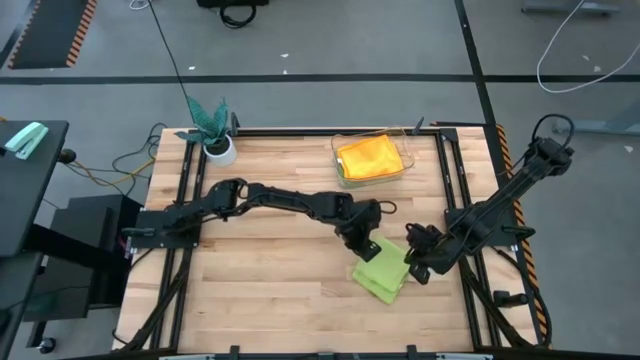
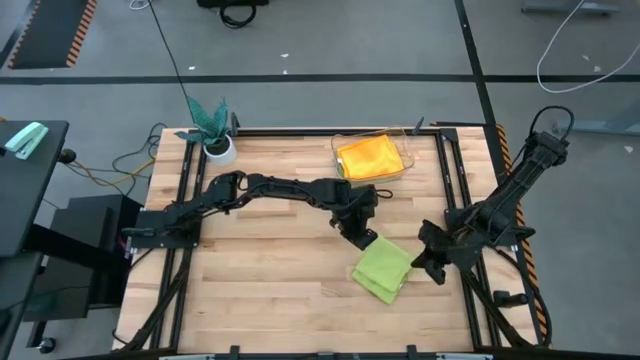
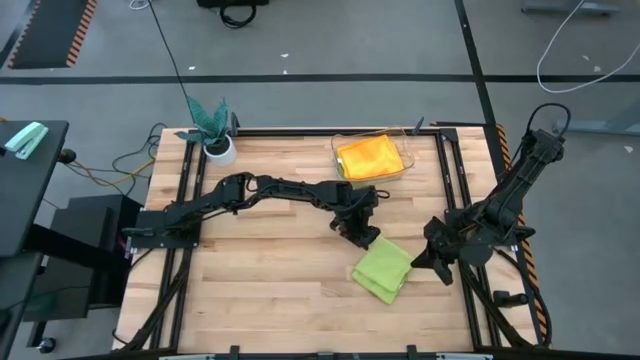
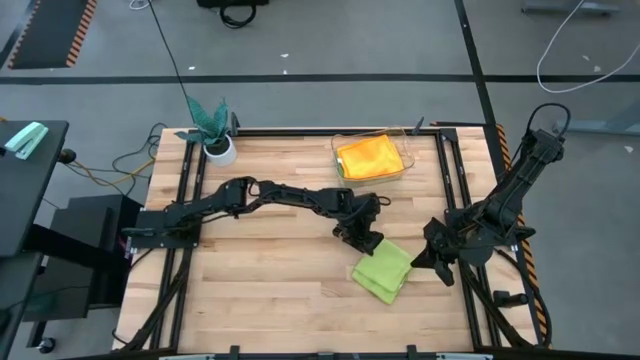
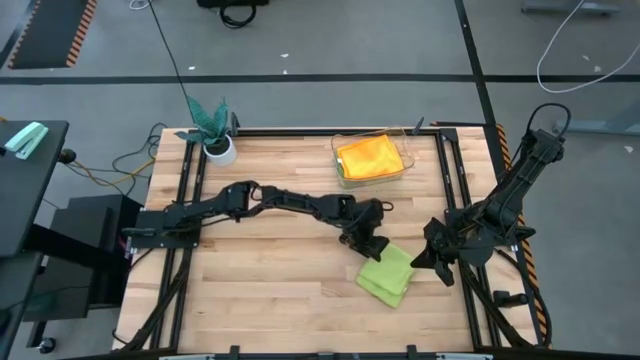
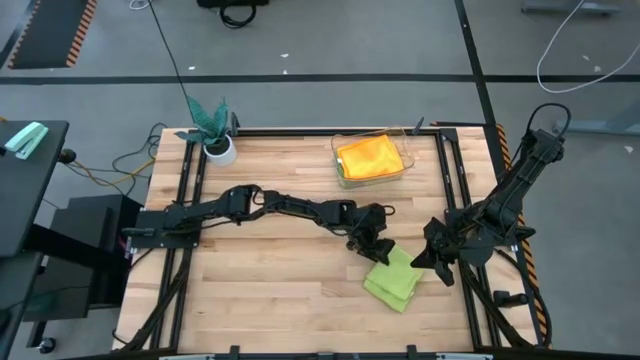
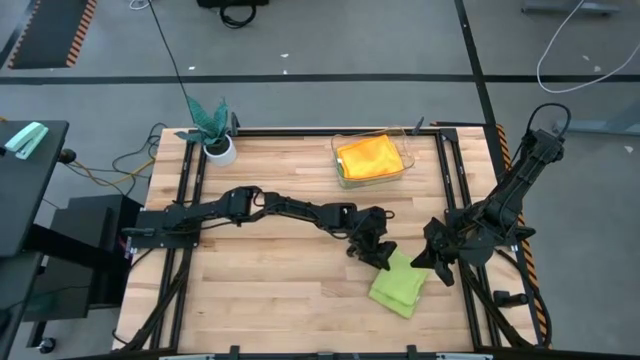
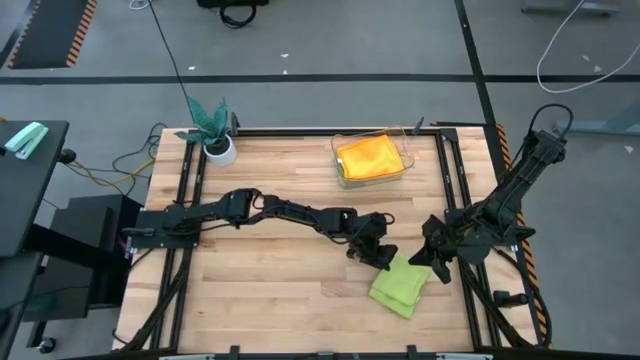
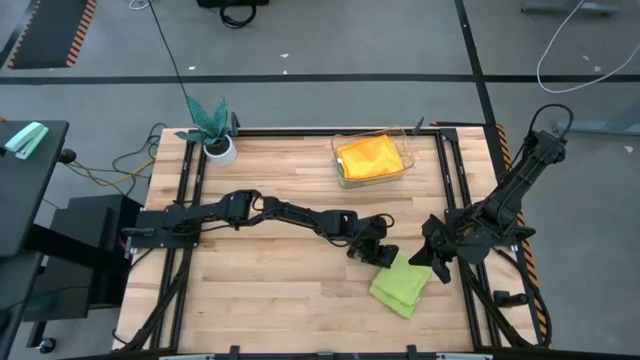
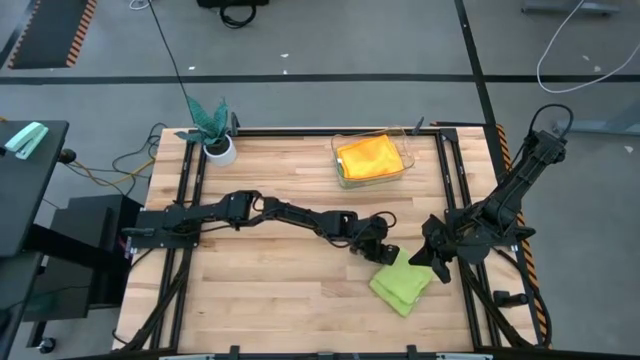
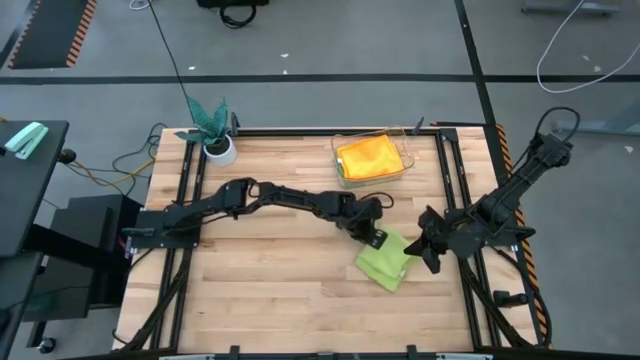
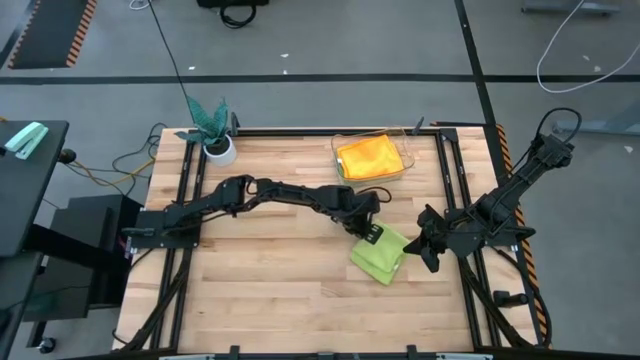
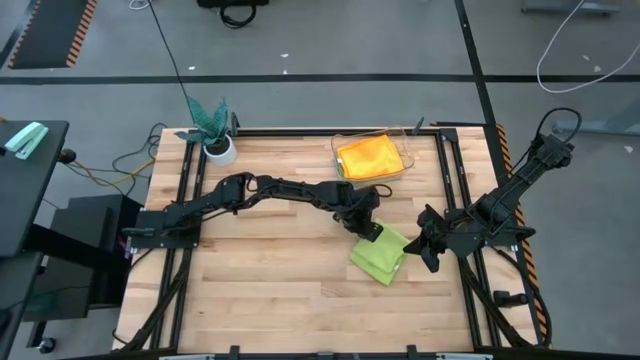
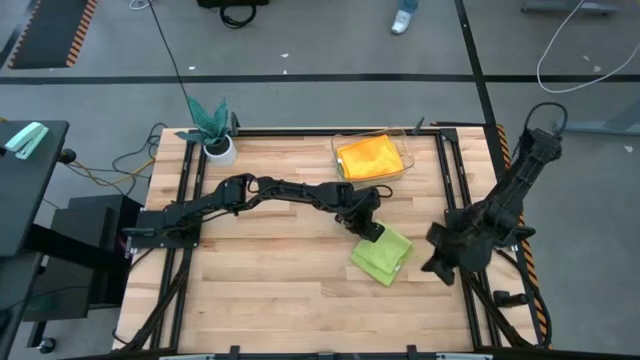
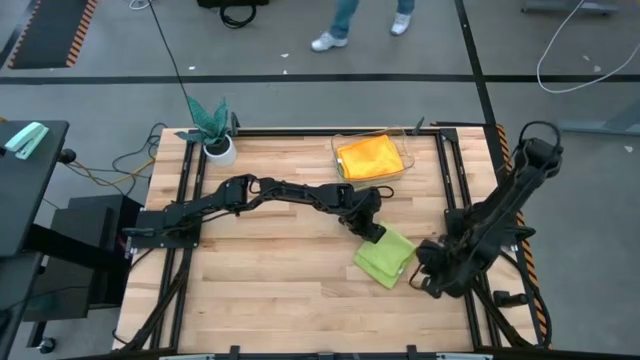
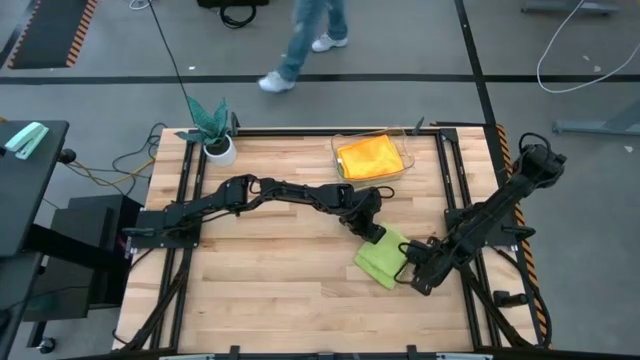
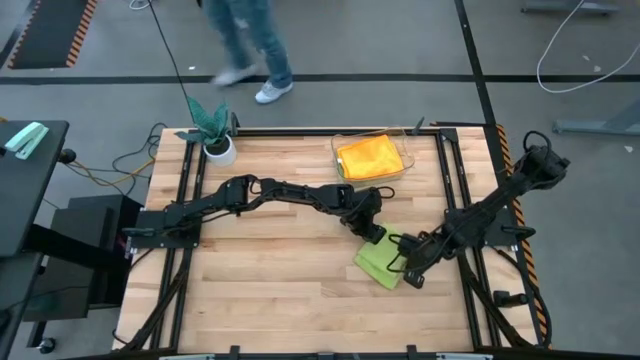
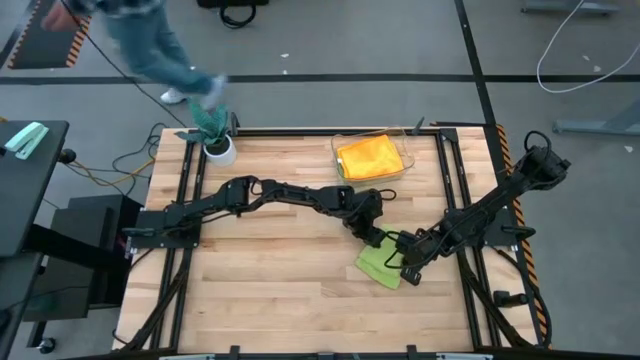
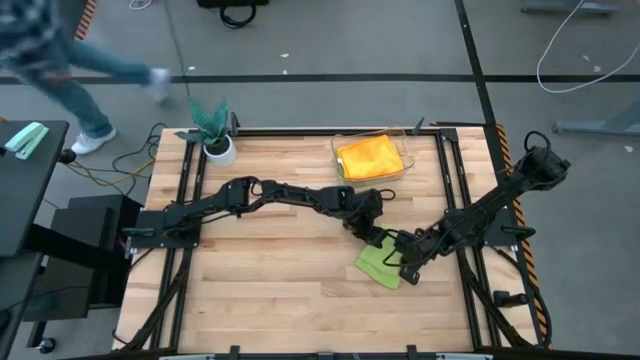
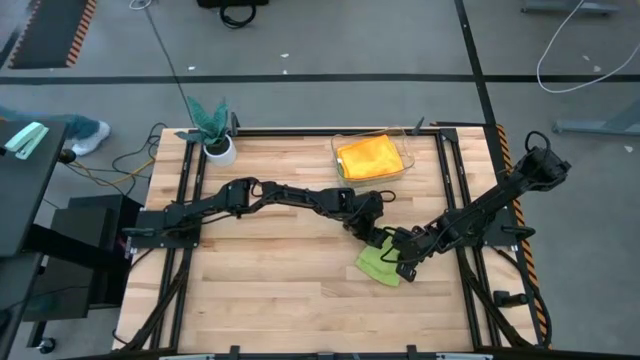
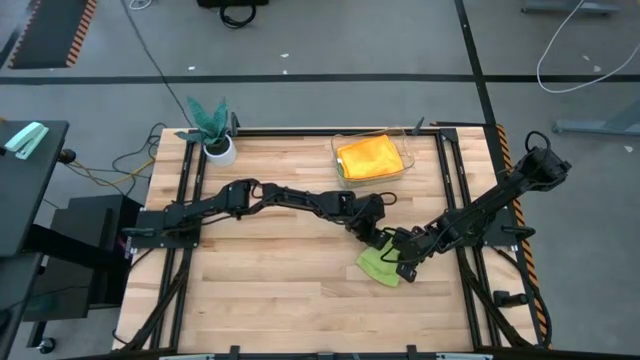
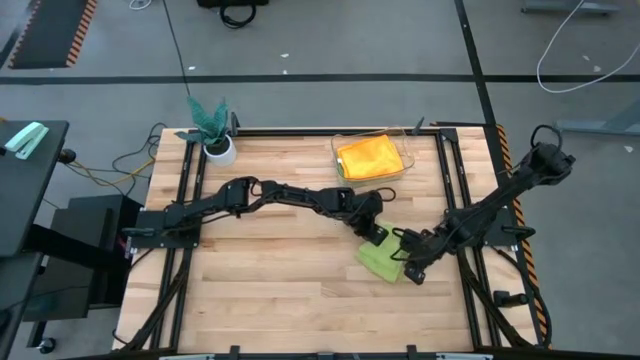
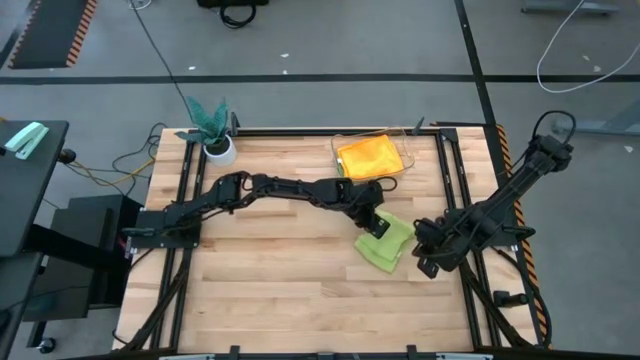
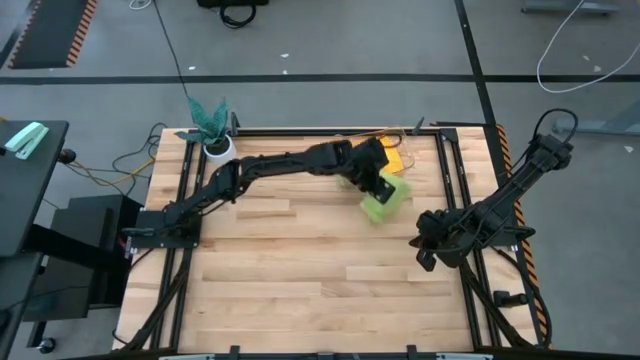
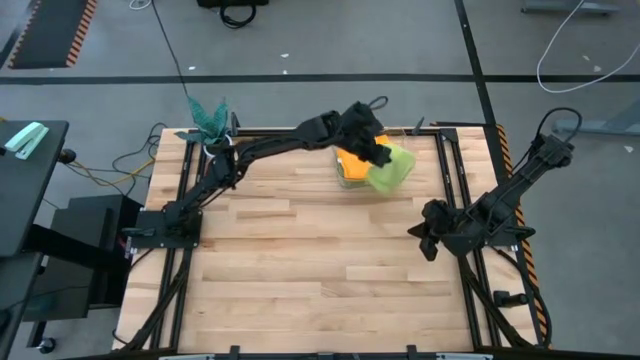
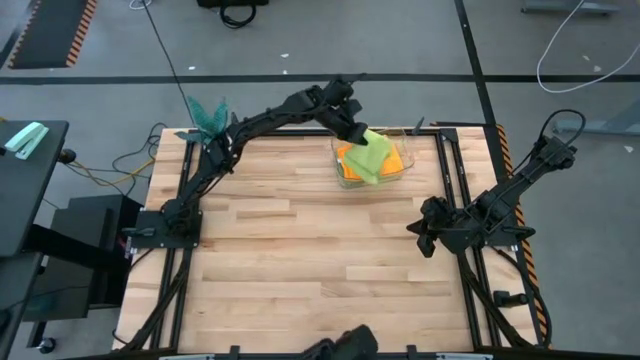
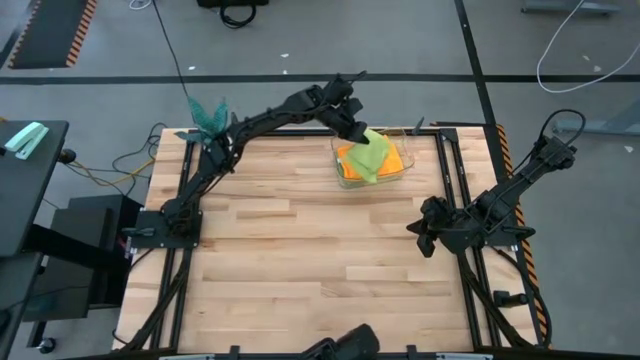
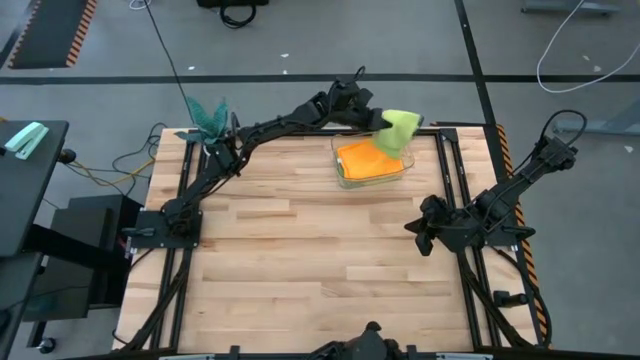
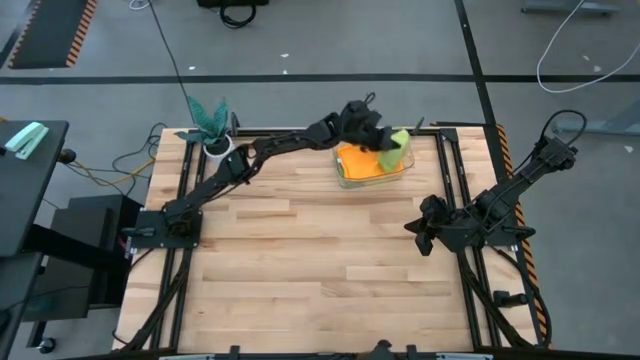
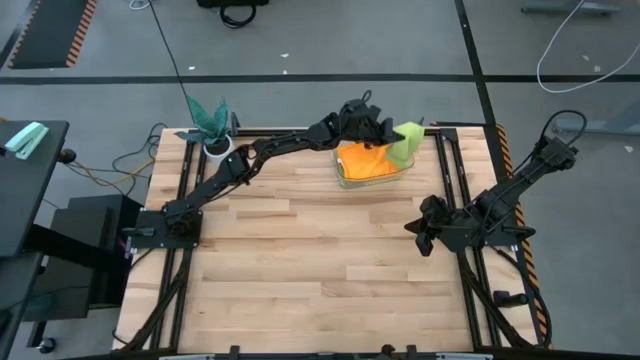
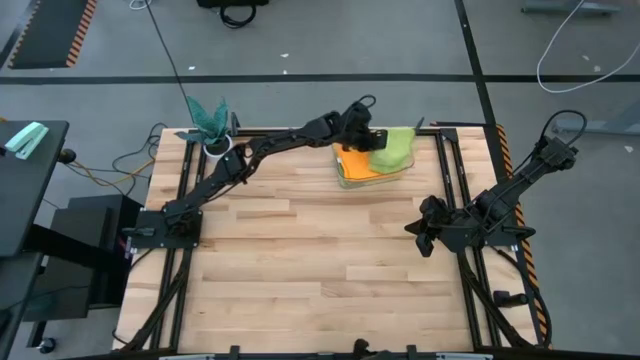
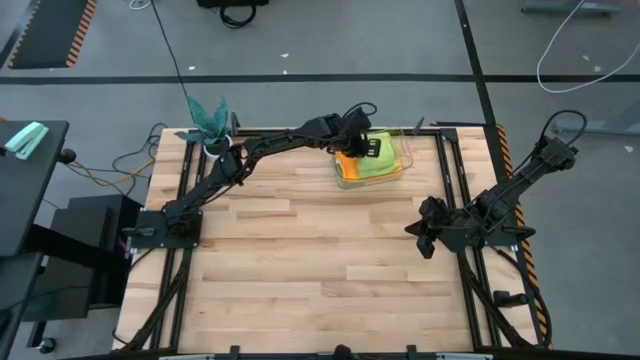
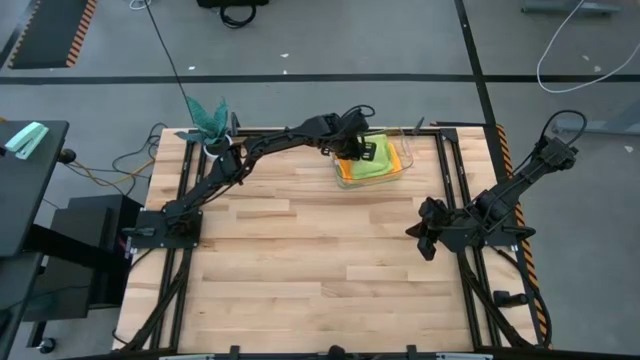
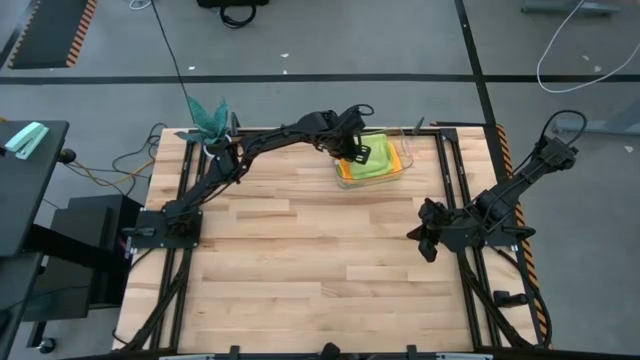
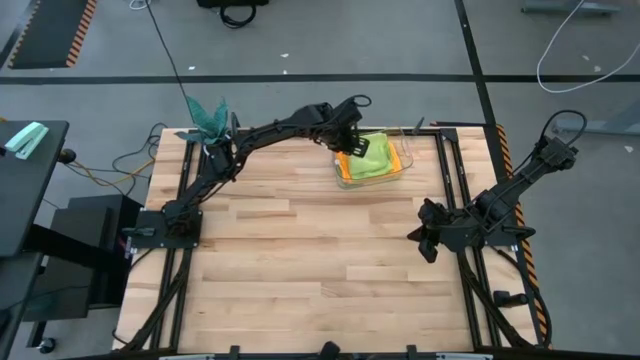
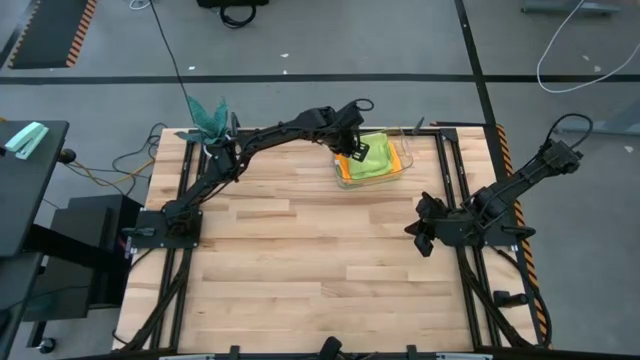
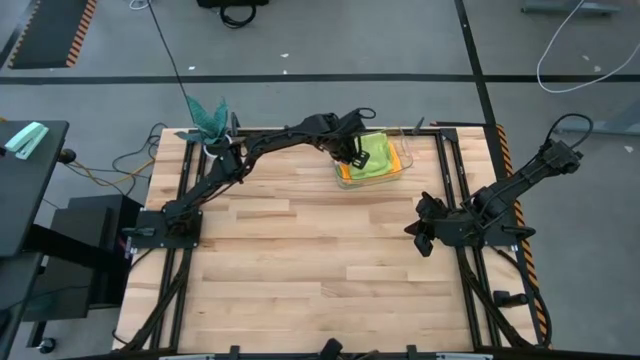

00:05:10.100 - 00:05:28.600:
Task: Fold microfiber towels
Stack the light green towel on top of the orange towel in the transparent bin

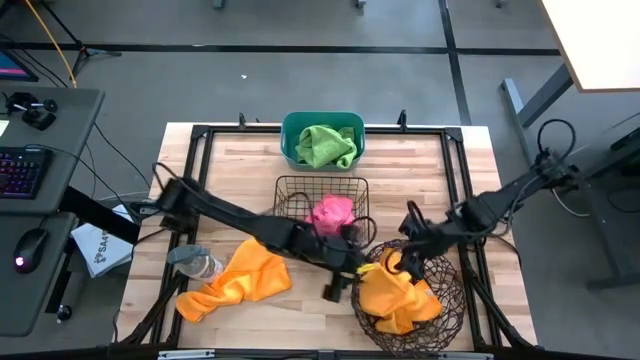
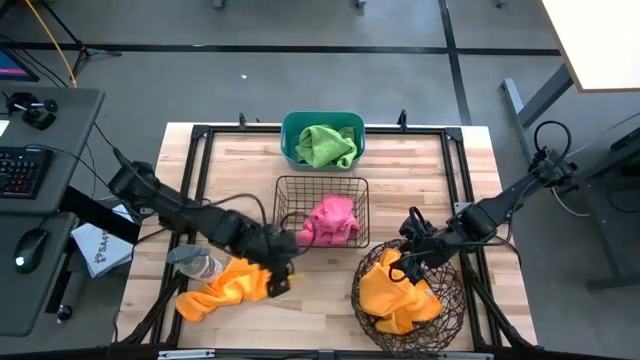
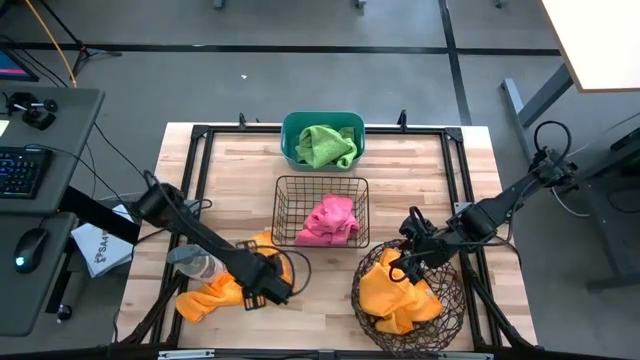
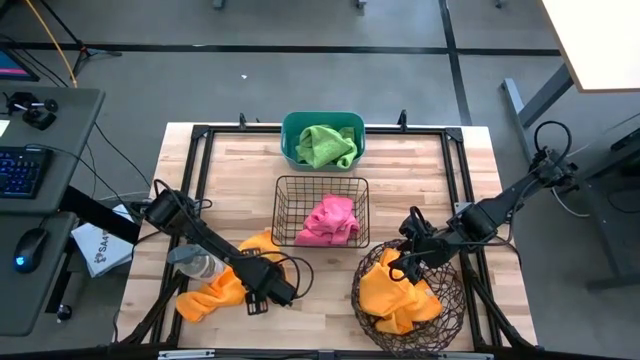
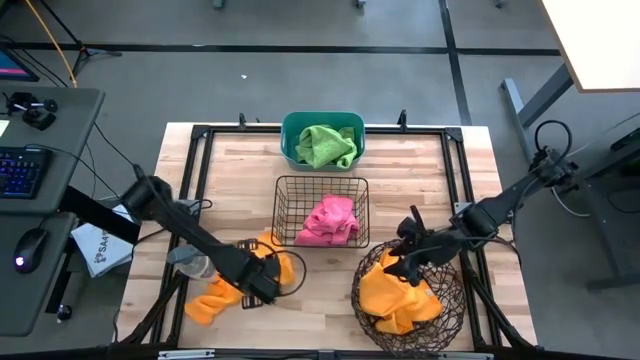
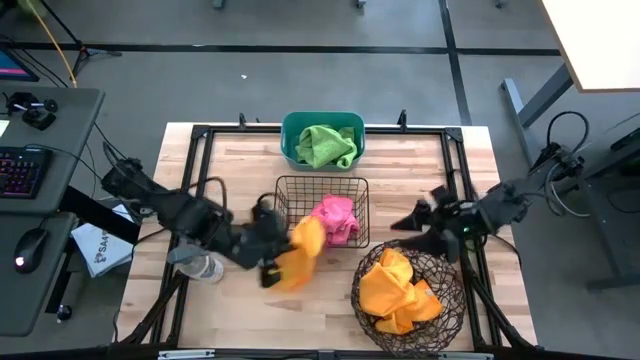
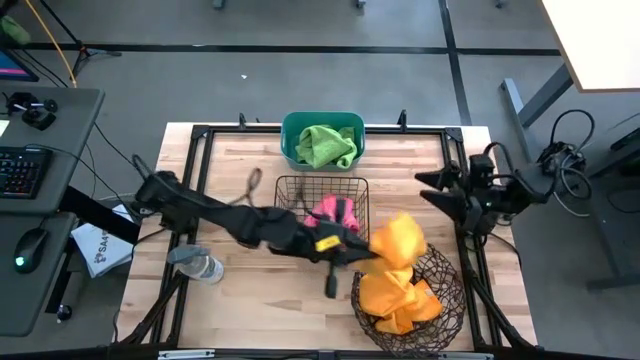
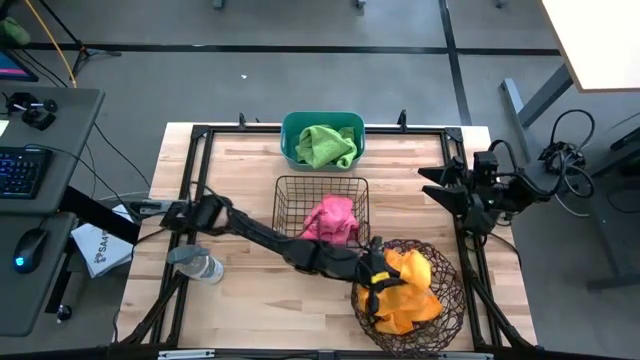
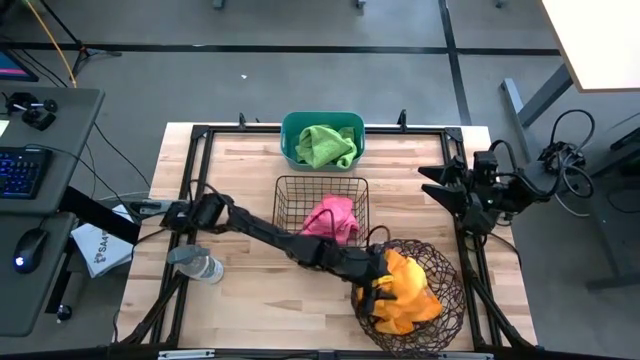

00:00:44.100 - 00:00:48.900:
Task: Sort microfiber towel by color & place in baskets
Put the yellow microfiber cloth into the spiral wire basket
